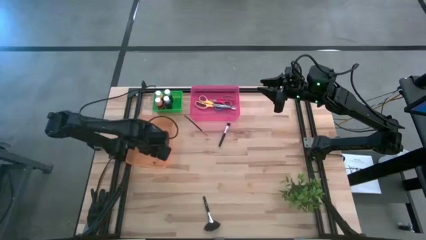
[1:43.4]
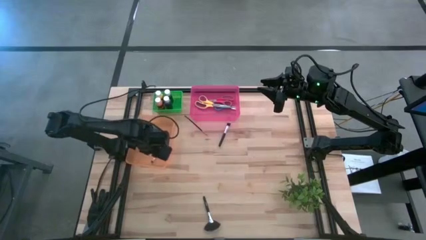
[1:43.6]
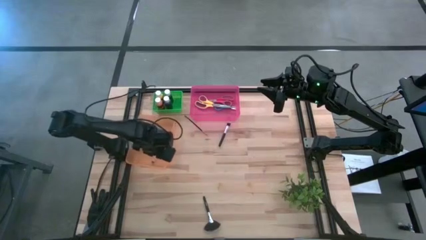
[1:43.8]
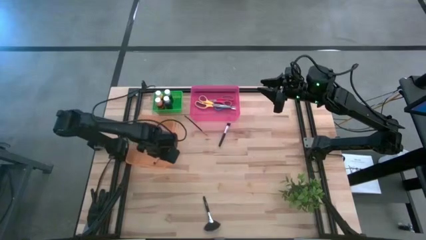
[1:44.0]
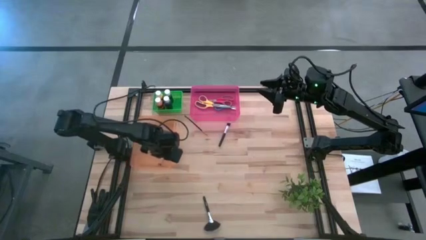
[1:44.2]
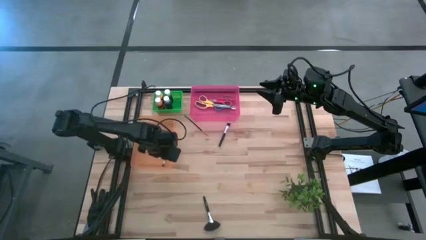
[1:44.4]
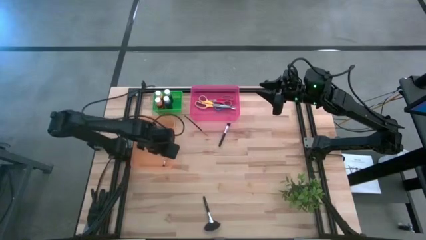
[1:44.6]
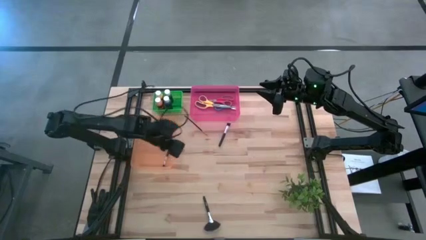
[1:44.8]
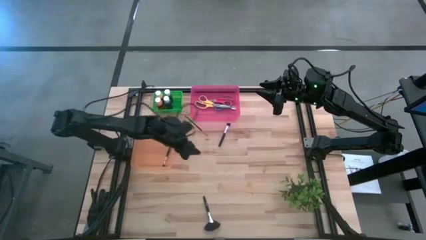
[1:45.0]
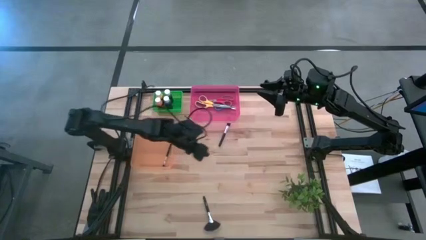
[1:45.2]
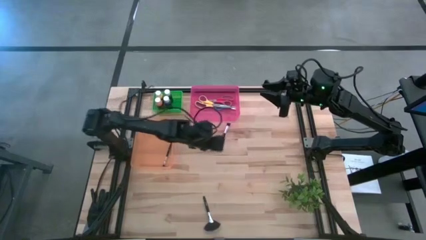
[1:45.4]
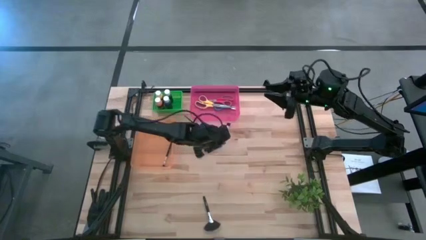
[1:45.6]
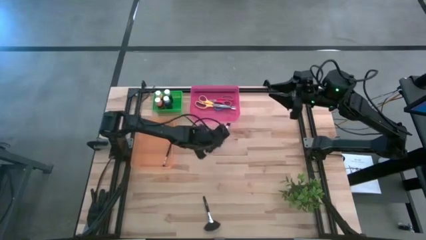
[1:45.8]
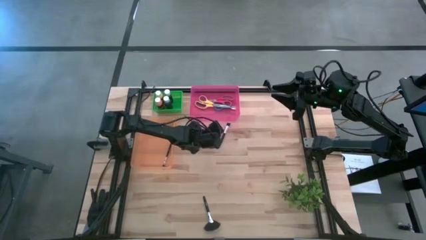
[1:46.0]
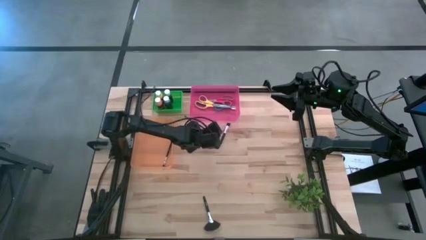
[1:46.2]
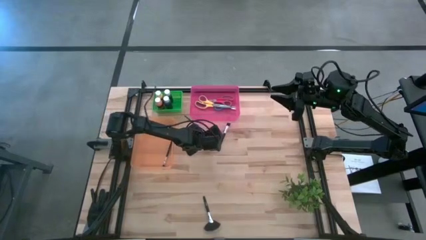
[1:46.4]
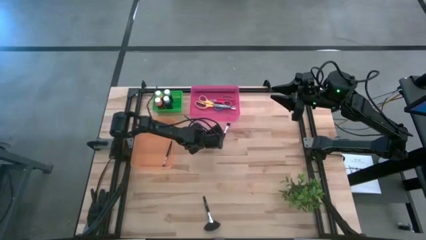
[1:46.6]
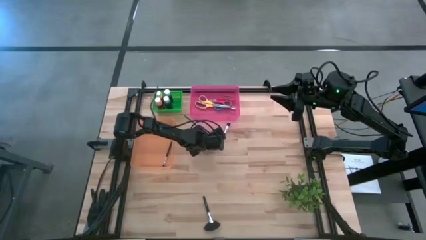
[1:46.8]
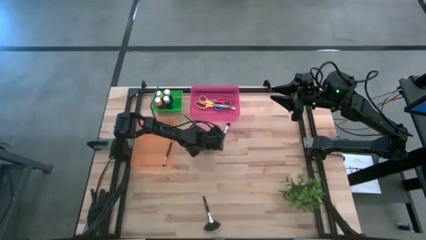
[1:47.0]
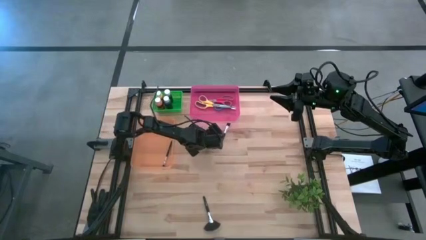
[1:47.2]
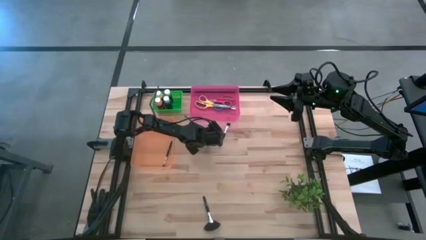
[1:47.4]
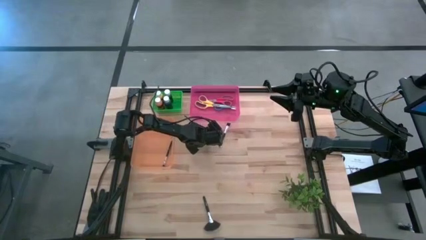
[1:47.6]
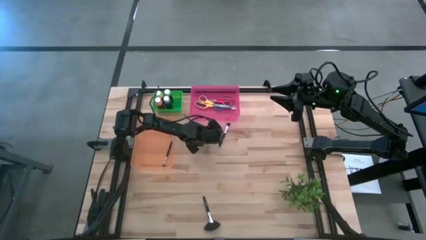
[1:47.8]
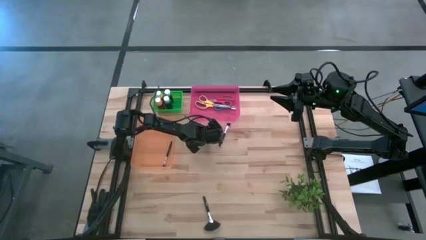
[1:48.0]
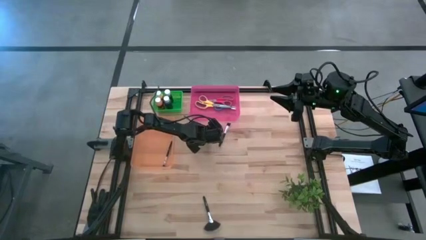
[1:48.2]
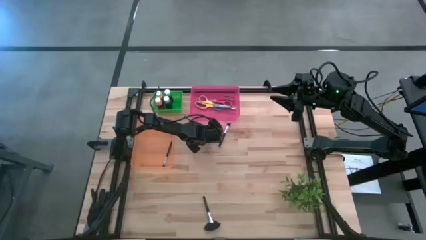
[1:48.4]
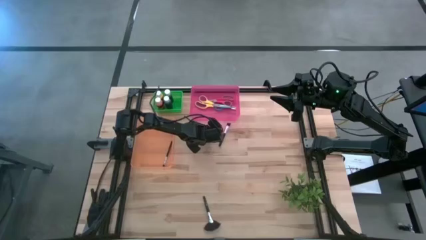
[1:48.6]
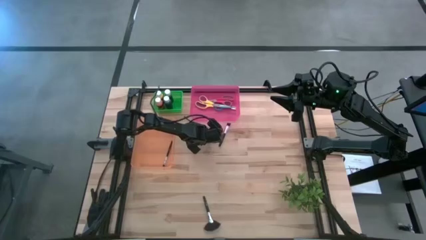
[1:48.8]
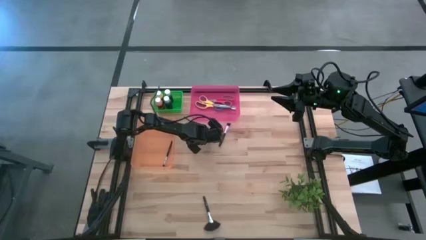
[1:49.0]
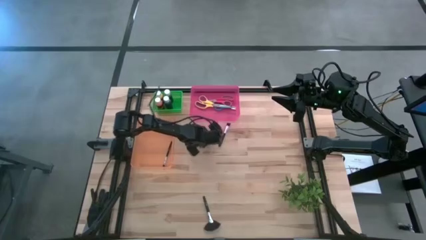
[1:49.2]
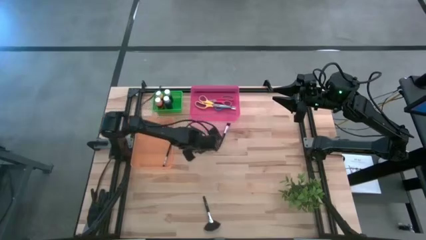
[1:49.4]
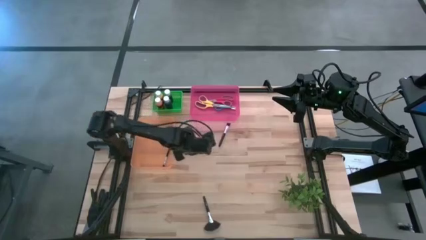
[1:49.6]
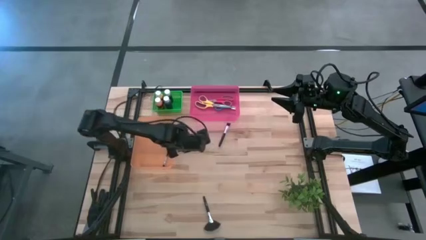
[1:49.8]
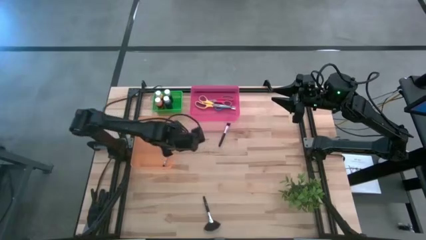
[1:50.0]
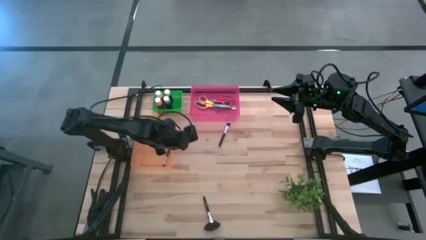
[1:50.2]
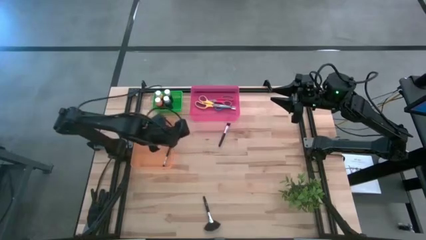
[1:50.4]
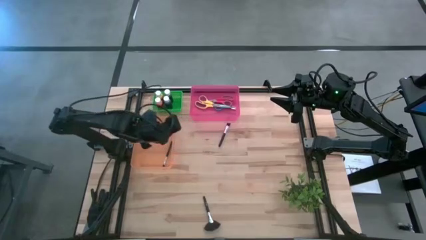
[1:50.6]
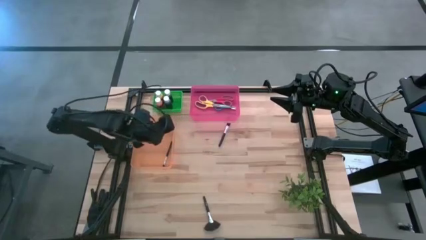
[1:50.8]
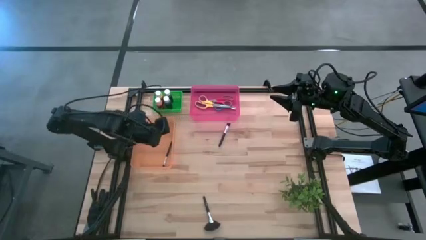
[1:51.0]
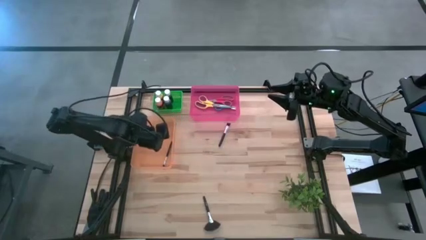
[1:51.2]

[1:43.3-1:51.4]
Task: Pick & Place Paint Supplies
Put the black paintbrush into the orange bin

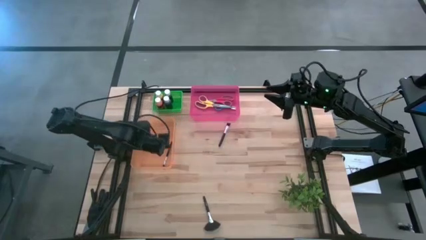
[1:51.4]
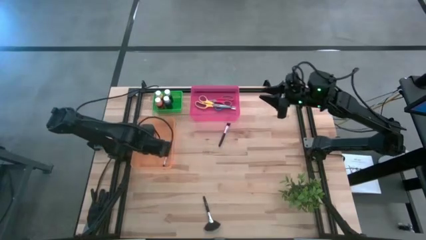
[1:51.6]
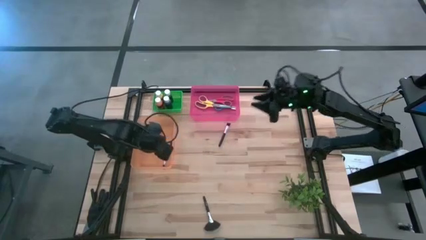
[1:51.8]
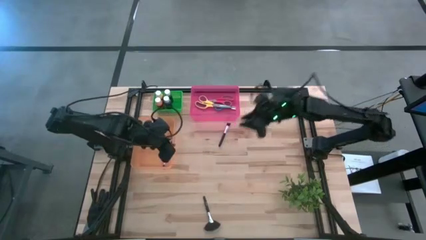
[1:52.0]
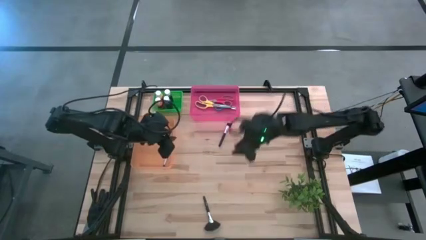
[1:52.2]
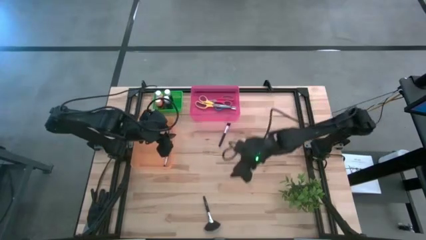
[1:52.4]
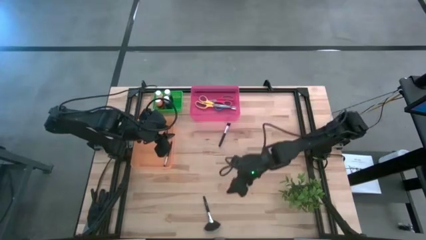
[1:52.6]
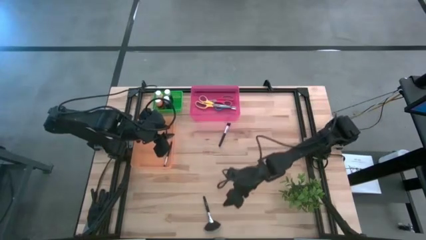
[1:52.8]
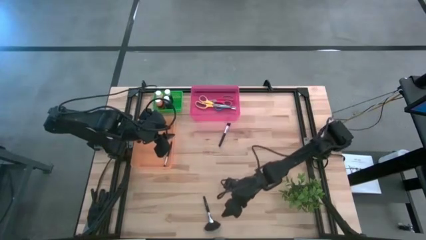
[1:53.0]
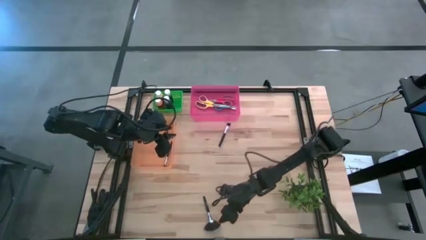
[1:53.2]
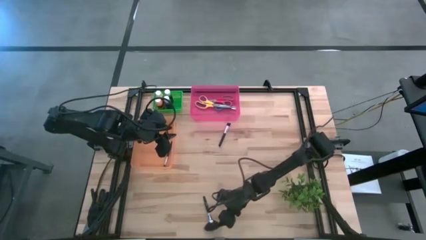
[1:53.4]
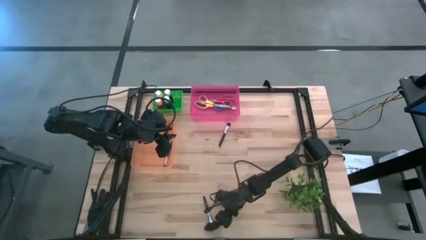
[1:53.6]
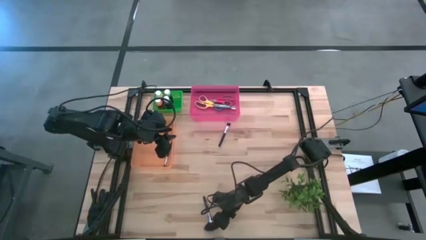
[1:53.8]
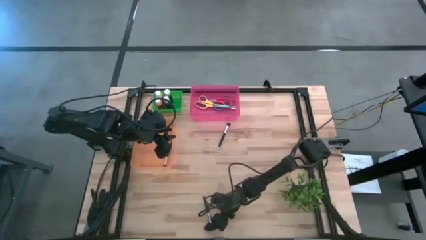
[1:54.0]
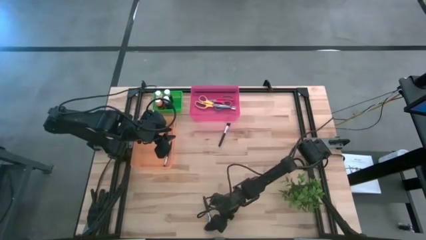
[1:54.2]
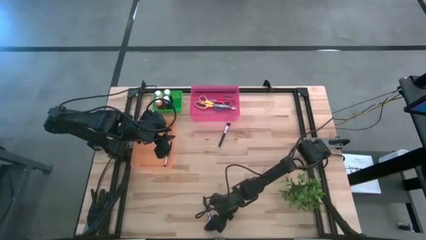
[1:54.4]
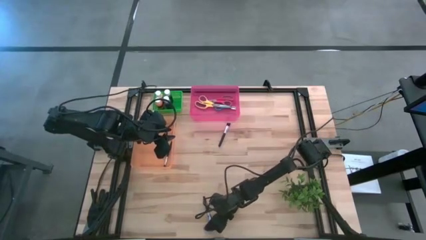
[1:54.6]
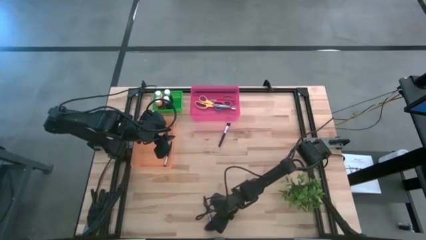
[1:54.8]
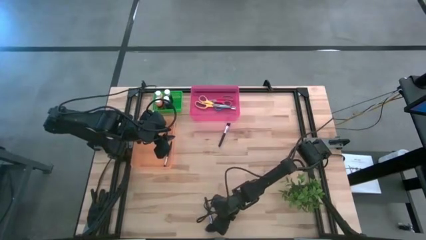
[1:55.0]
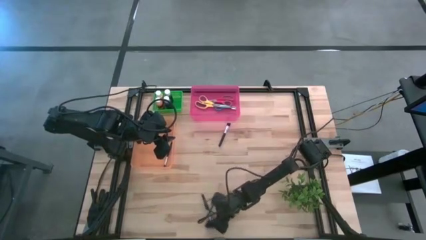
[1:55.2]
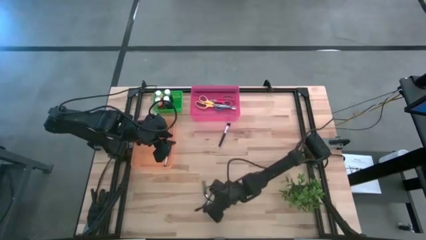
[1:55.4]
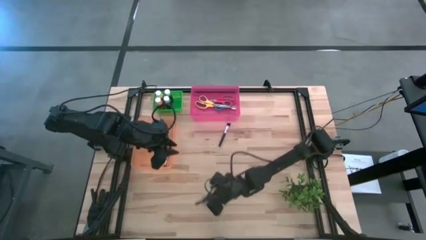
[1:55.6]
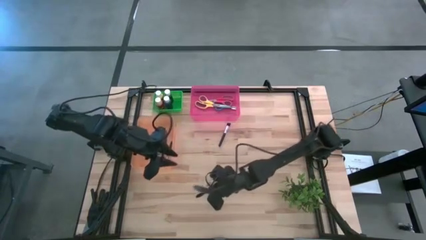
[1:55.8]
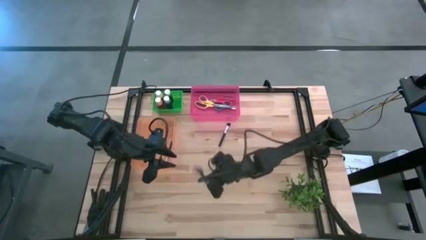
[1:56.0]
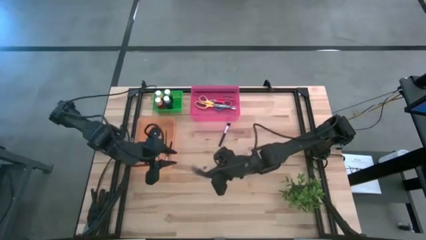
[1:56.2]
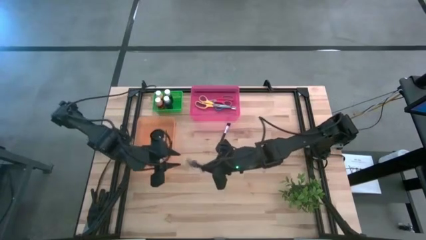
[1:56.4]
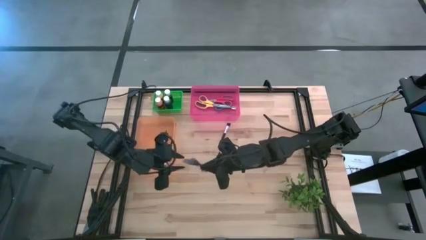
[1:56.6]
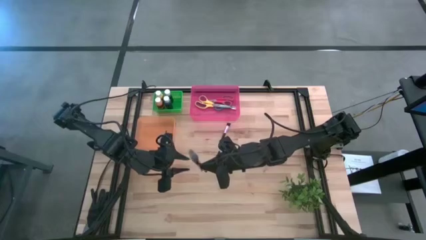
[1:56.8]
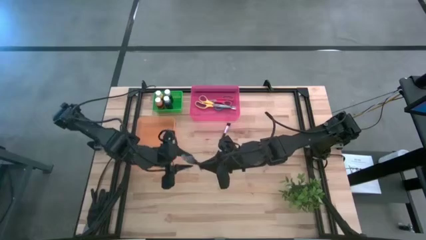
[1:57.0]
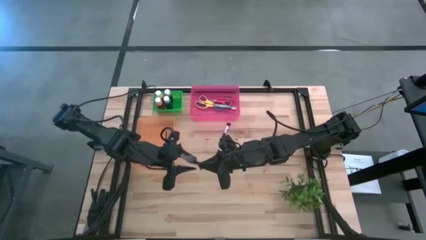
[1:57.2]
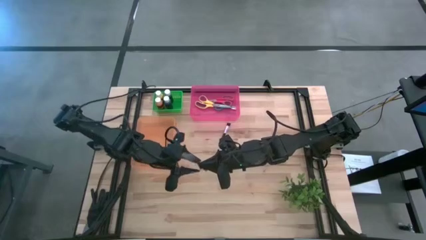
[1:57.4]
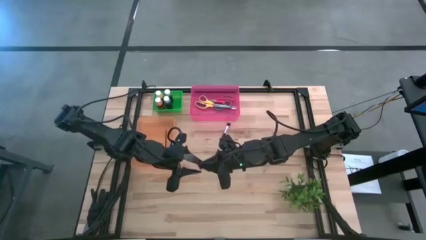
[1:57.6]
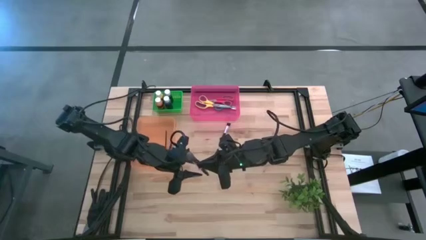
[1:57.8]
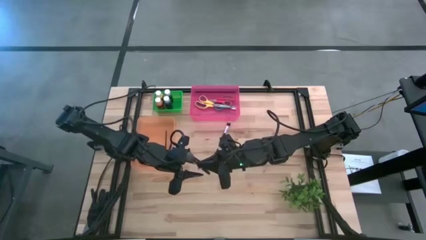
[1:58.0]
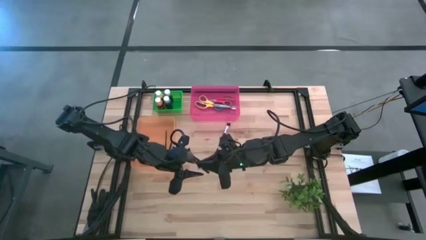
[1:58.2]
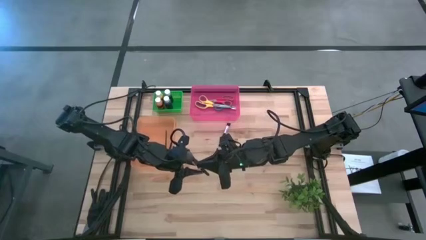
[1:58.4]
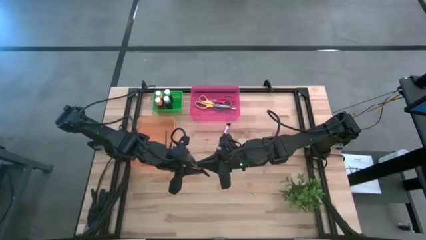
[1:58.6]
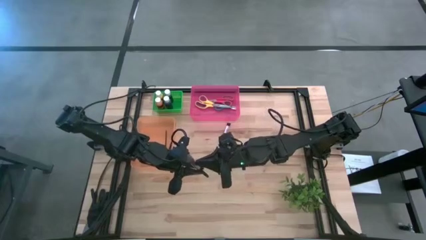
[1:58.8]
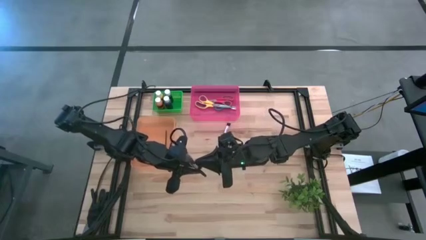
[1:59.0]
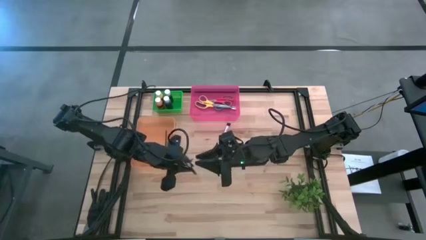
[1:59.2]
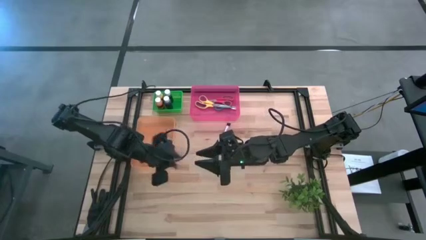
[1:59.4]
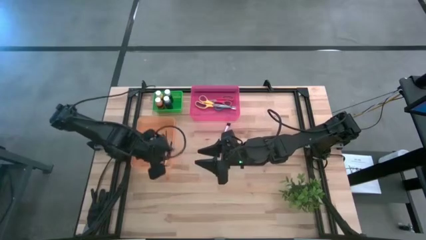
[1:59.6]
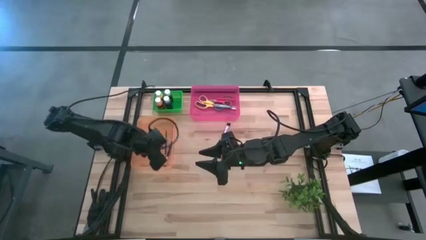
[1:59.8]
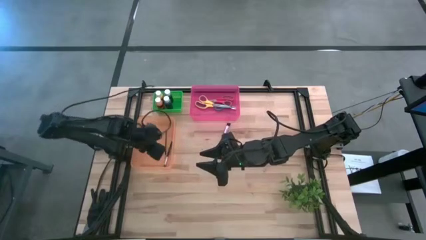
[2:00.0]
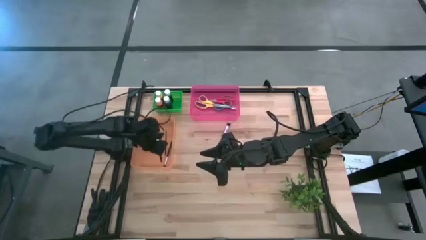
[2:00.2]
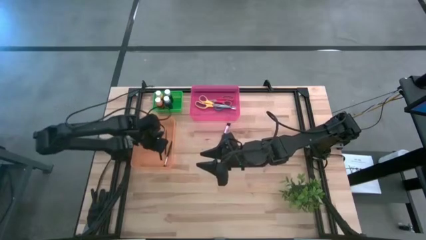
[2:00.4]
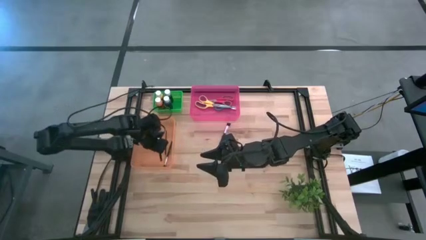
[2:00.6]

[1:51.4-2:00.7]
Put the black paintbrush into the orange bin
